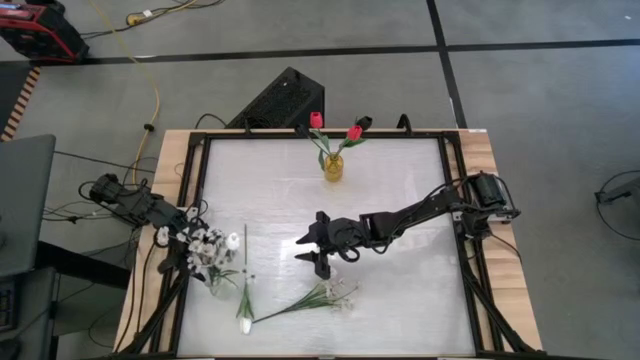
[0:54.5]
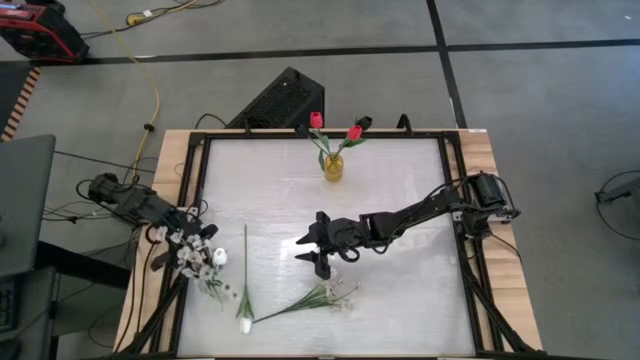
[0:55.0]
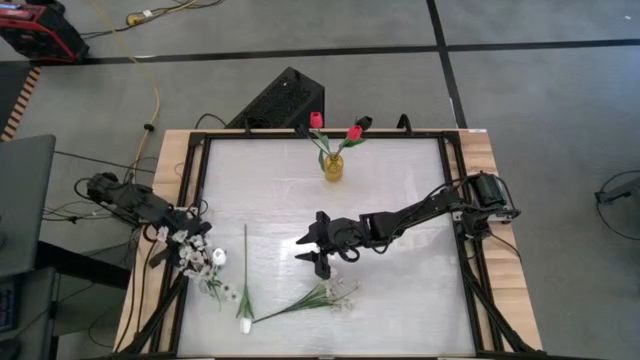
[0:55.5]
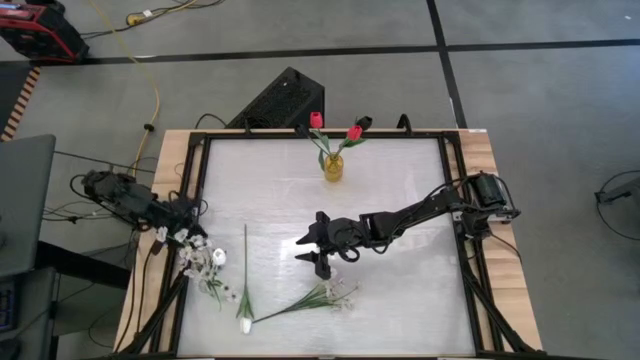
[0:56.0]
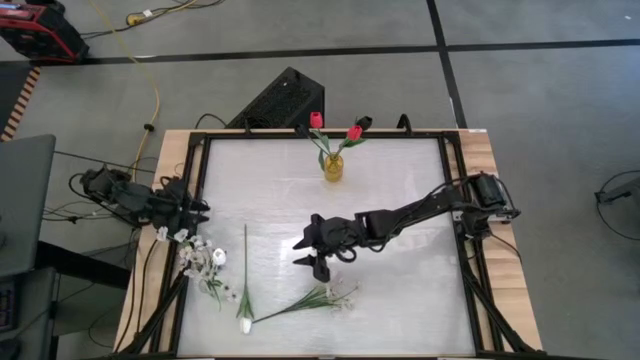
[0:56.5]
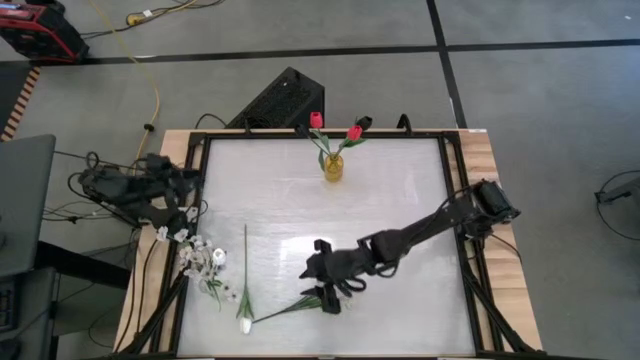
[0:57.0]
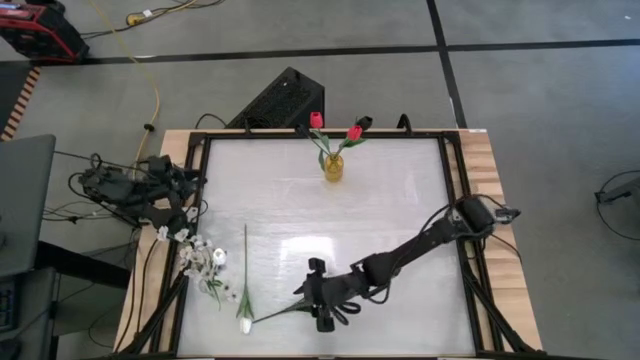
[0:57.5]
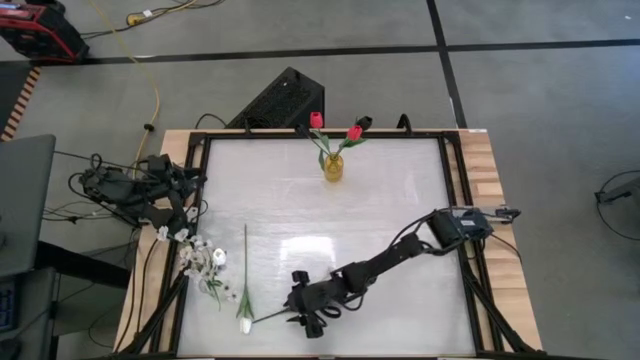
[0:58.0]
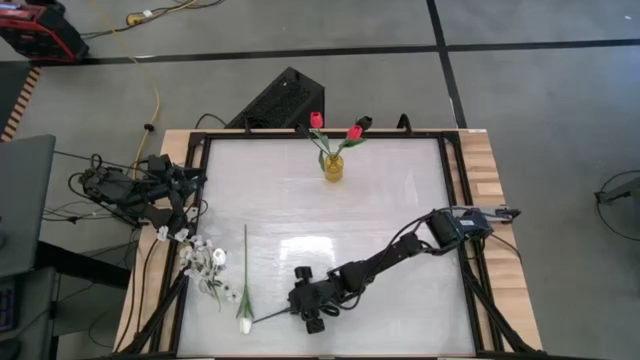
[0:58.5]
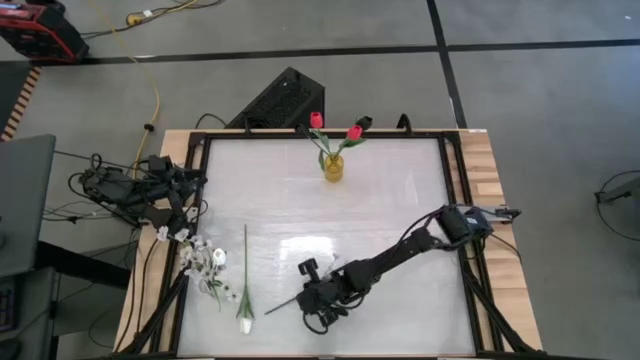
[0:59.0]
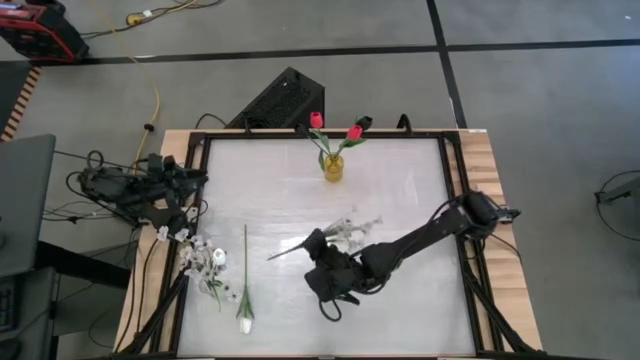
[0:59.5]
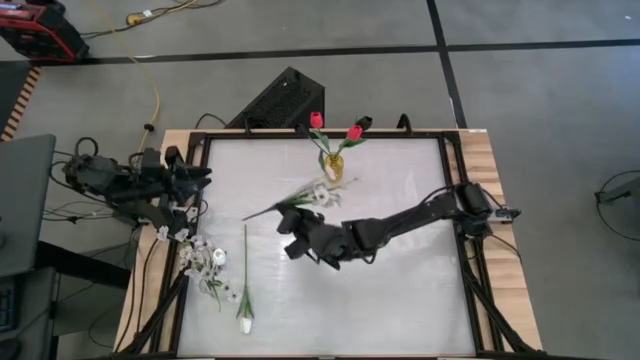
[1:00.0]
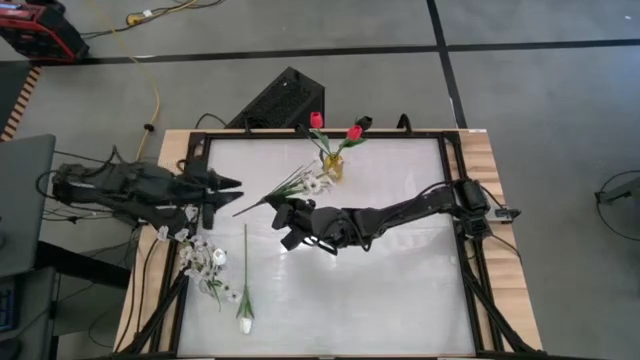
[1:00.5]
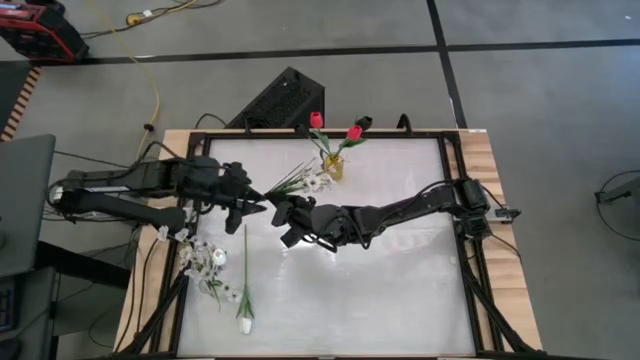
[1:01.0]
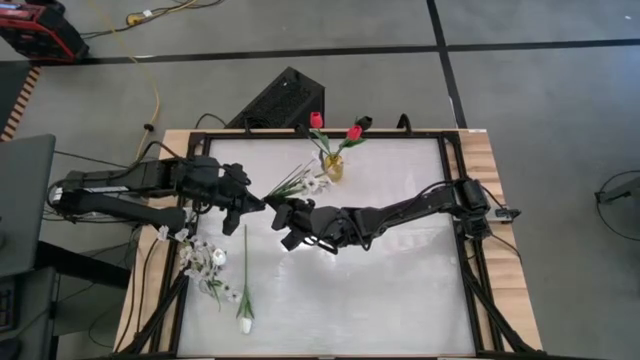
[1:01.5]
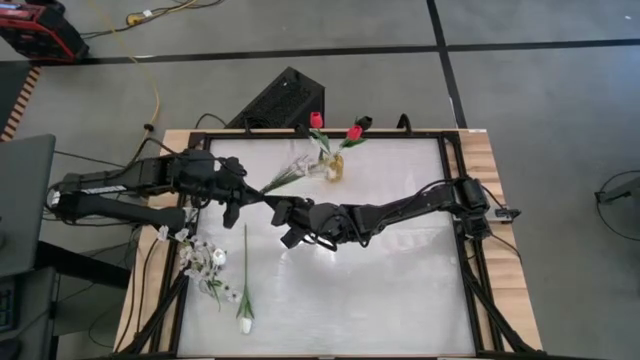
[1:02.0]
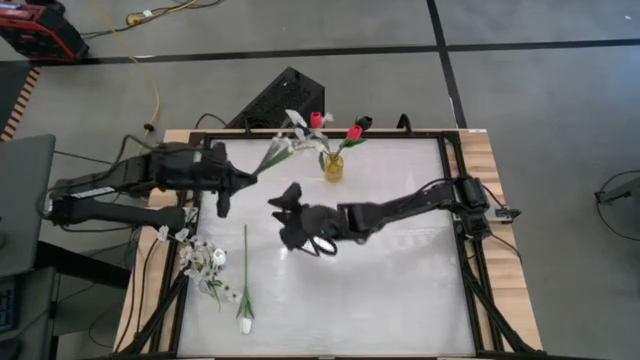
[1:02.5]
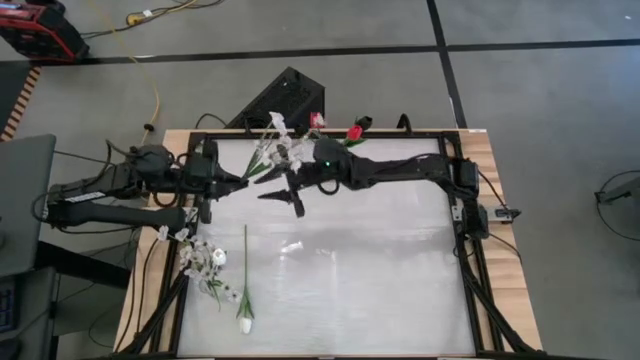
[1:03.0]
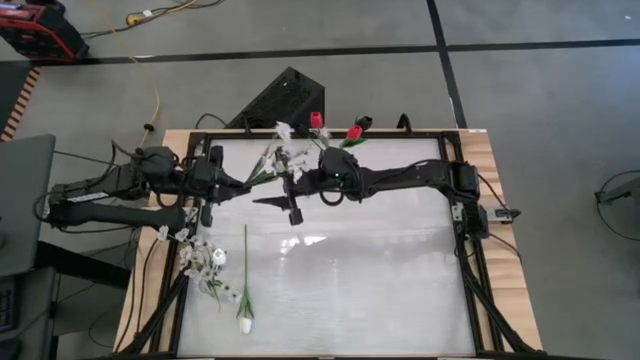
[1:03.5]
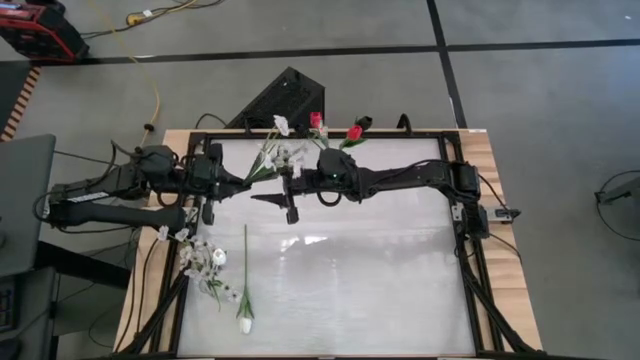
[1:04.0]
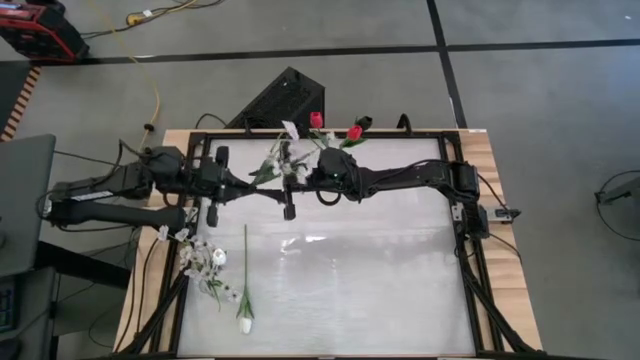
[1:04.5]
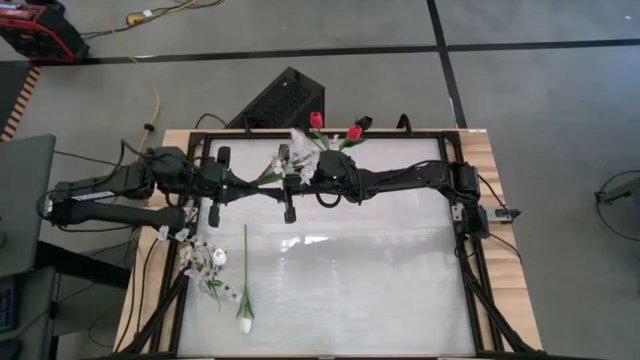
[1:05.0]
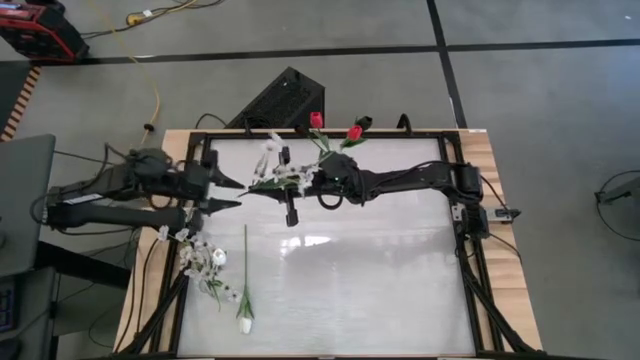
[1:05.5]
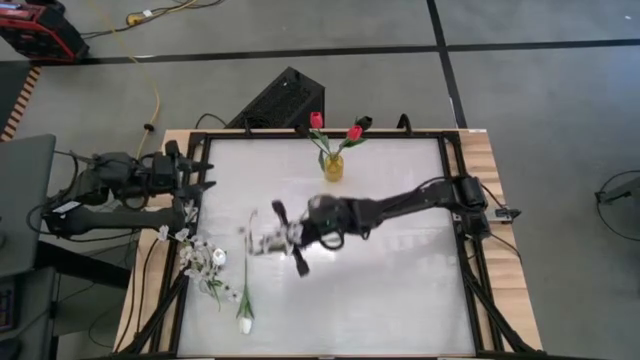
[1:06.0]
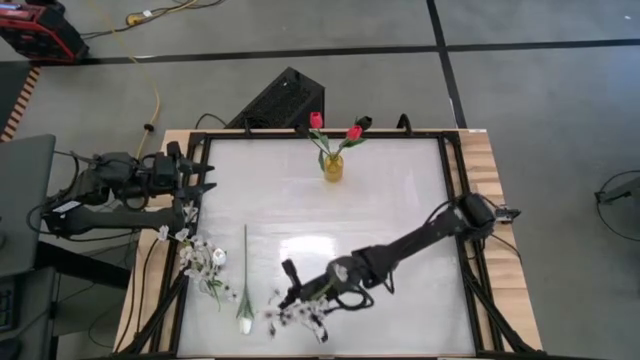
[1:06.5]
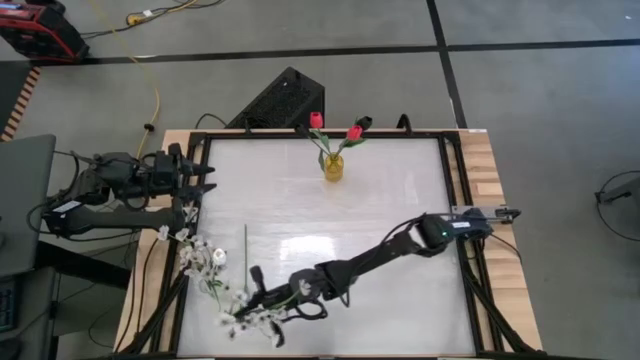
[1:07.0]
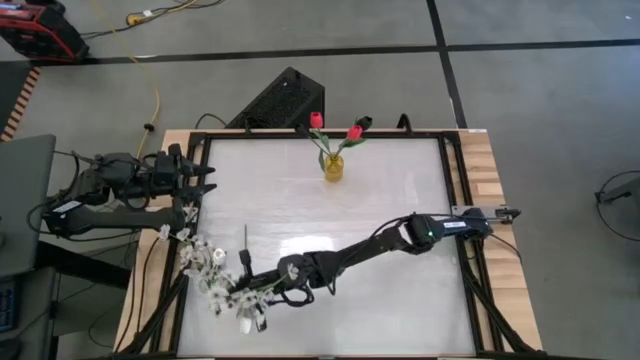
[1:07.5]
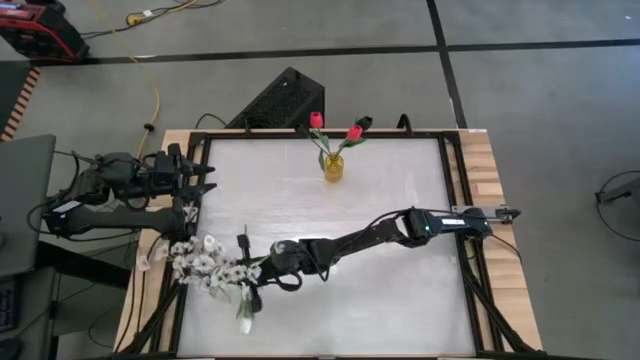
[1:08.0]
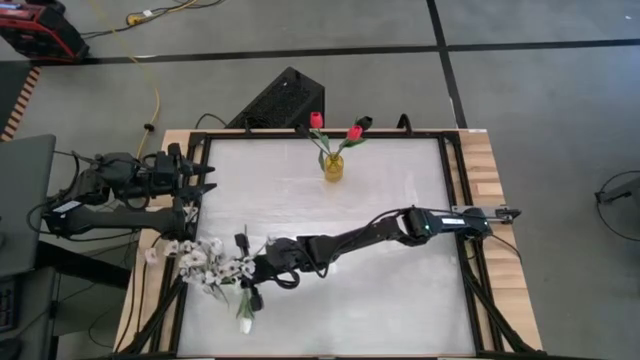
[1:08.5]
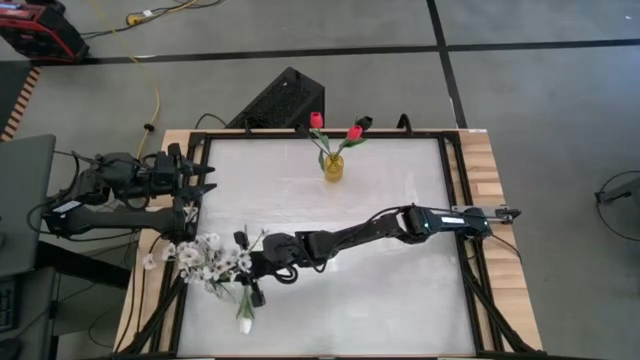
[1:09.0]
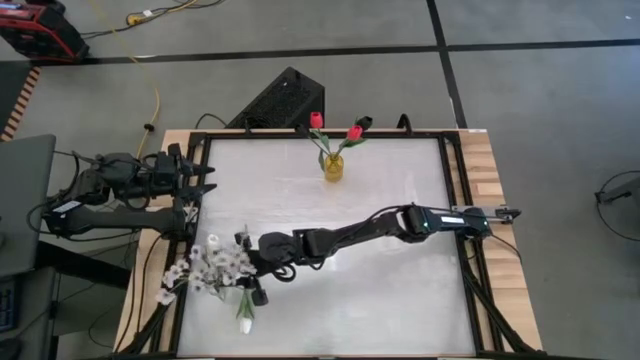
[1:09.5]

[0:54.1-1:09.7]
Task: Sort flowers into vase by color
Put the white flowers into the transparent vase

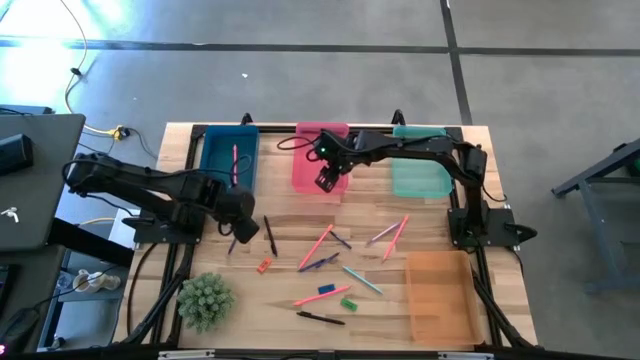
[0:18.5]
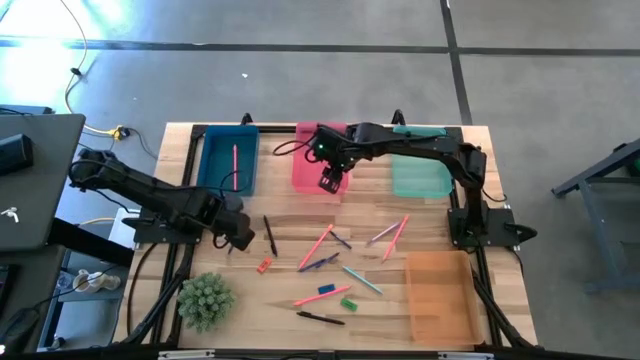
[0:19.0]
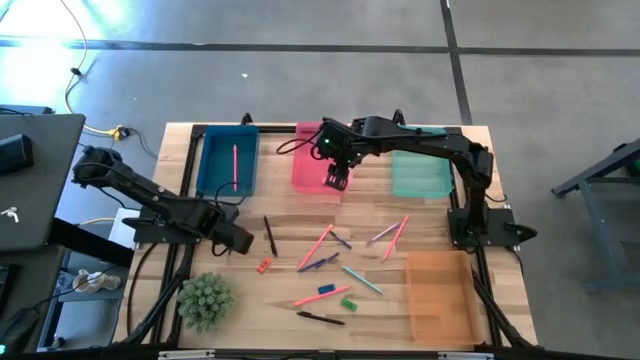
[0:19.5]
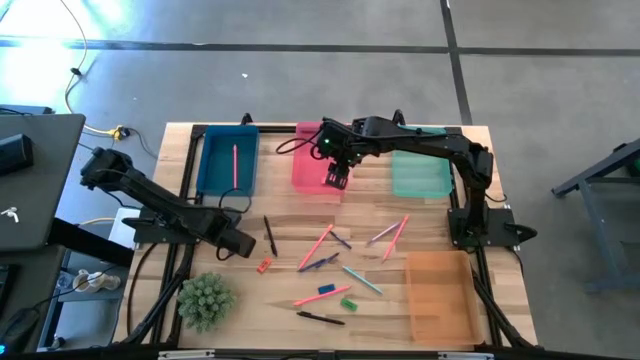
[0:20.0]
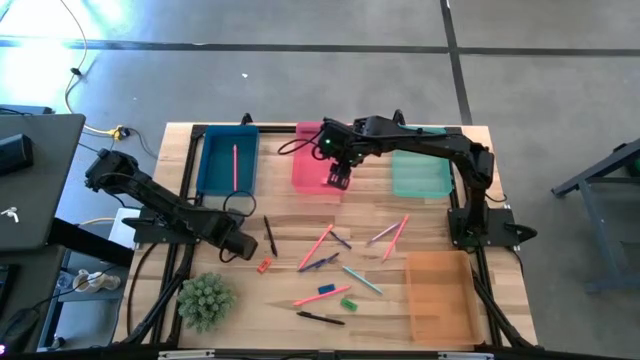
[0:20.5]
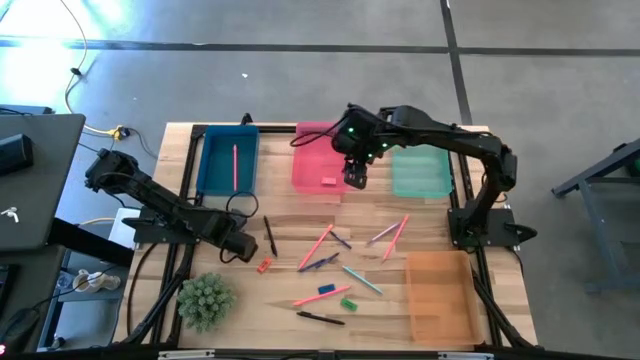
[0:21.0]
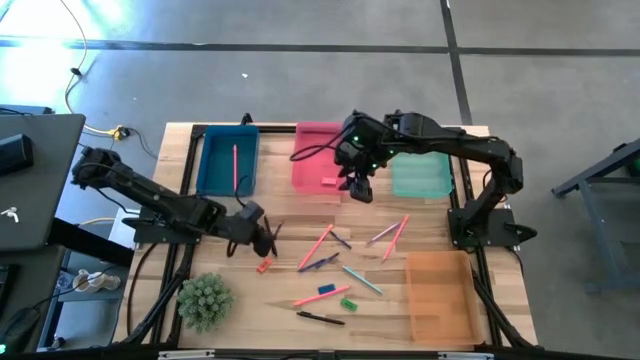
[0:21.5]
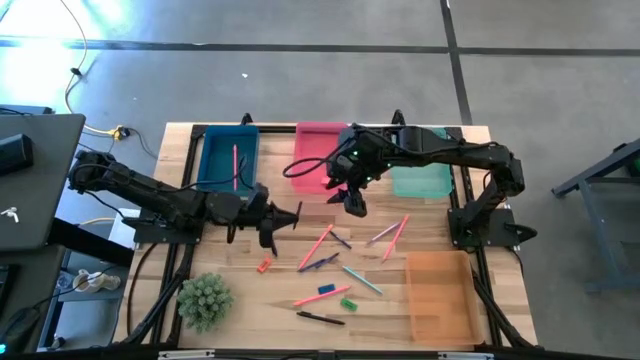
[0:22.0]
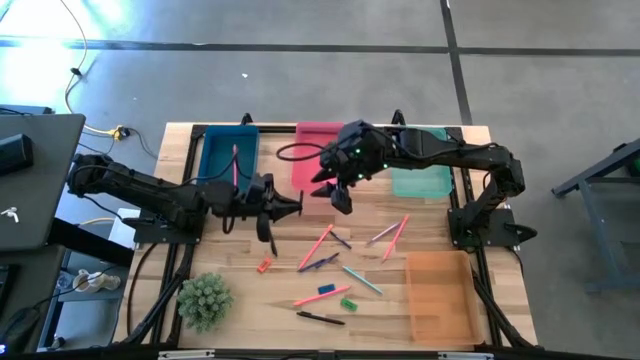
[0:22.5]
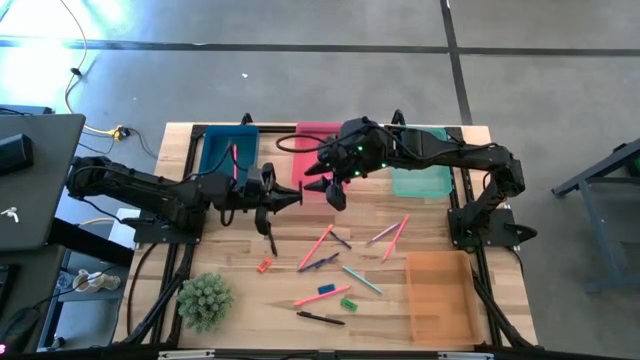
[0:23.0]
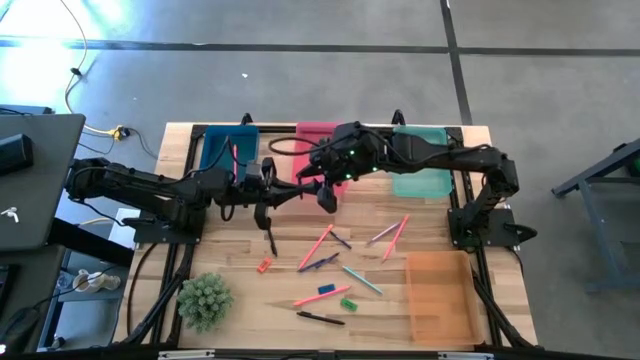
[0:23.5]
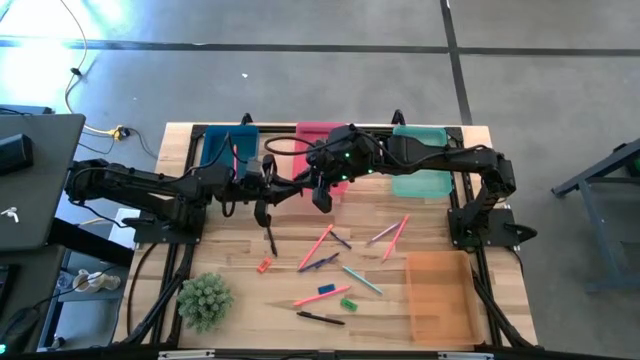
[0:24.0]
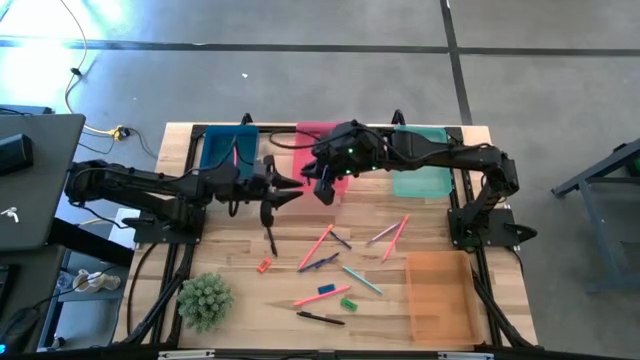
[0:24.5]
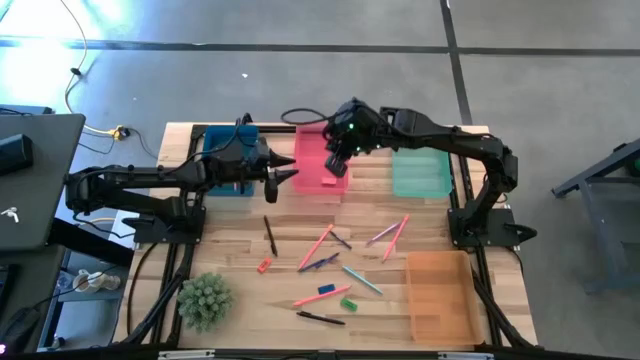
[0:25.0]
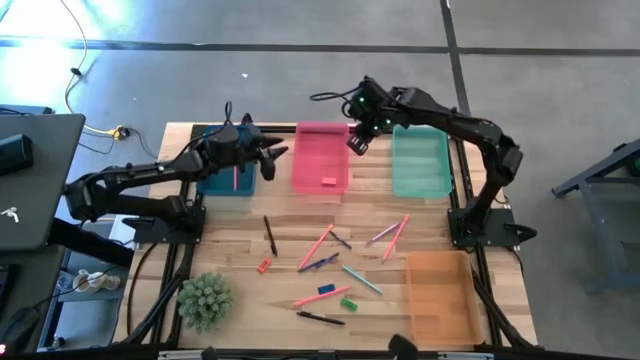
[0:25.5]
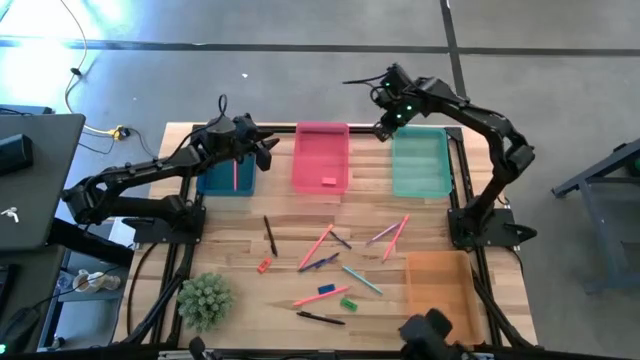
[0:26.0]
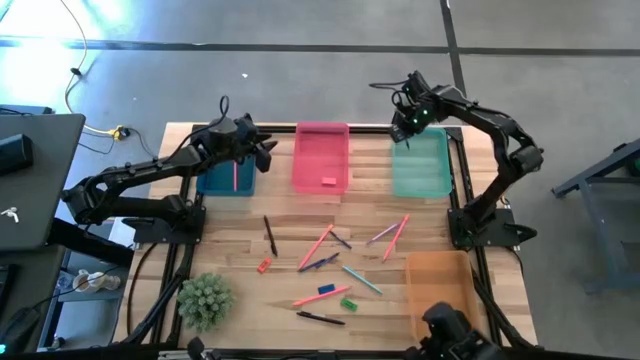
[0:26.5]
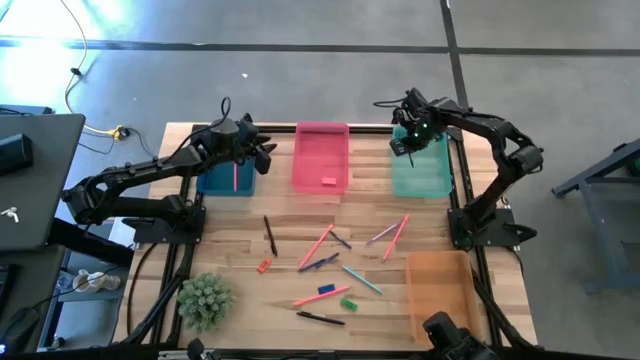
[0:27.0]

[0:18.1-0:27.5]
Task: Sort crayons/erasers/pens/pencils in bins
Put the blue crayon into the green bin
